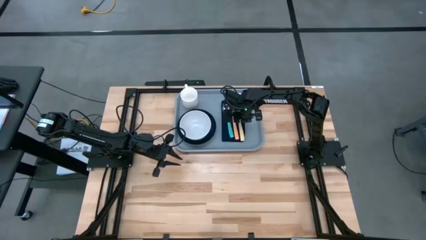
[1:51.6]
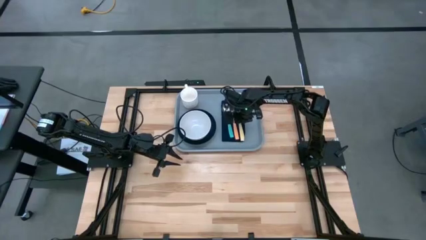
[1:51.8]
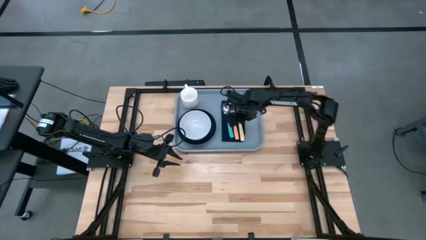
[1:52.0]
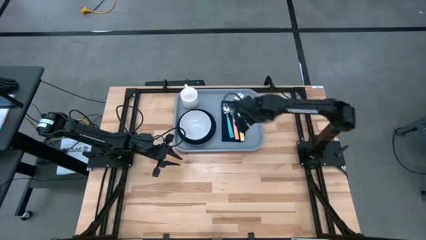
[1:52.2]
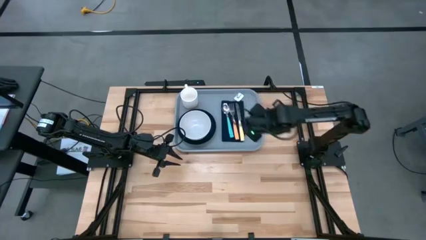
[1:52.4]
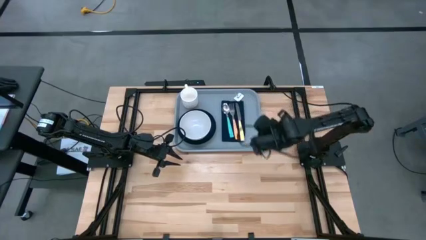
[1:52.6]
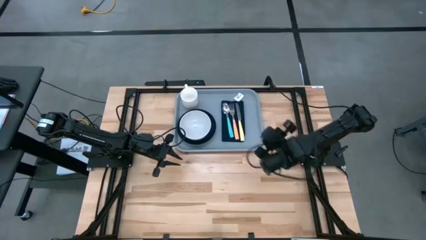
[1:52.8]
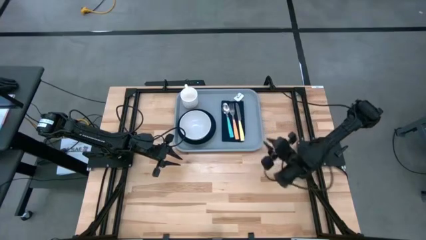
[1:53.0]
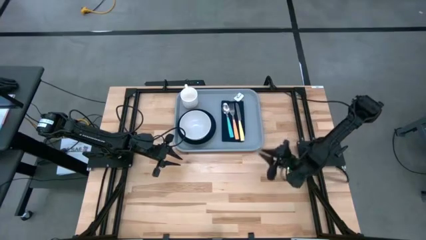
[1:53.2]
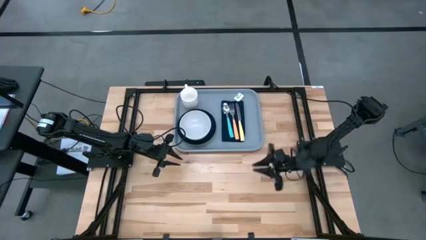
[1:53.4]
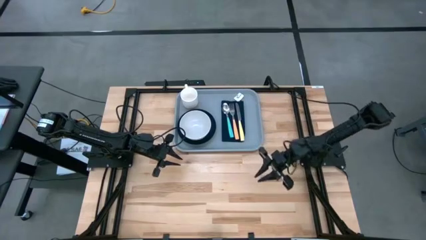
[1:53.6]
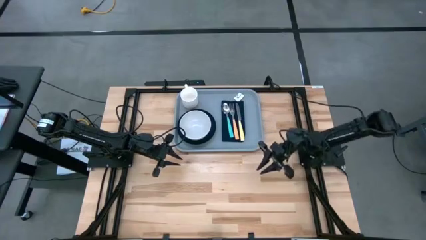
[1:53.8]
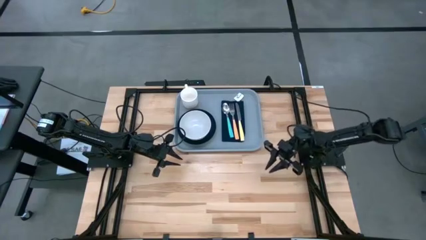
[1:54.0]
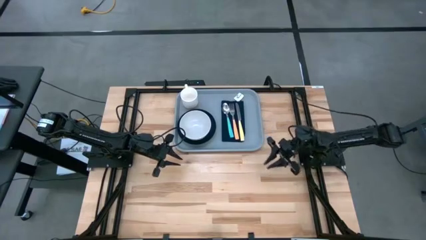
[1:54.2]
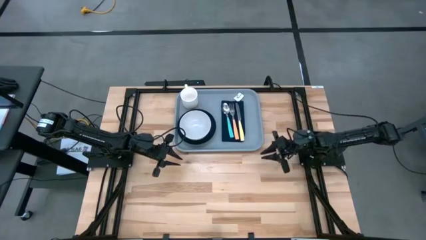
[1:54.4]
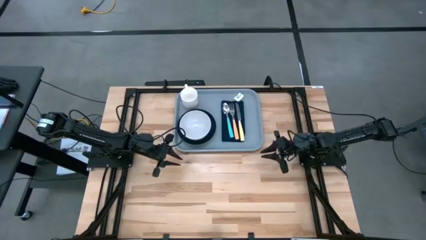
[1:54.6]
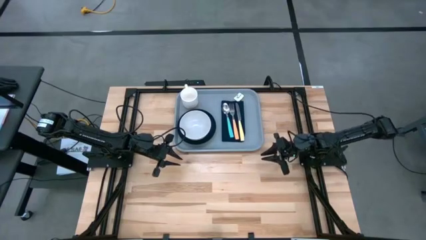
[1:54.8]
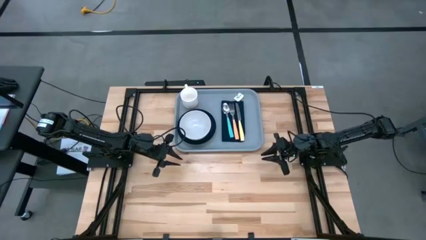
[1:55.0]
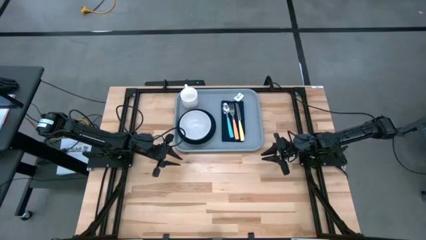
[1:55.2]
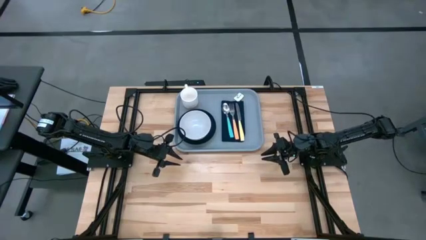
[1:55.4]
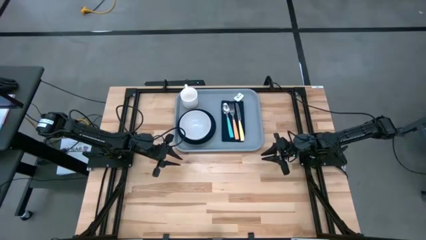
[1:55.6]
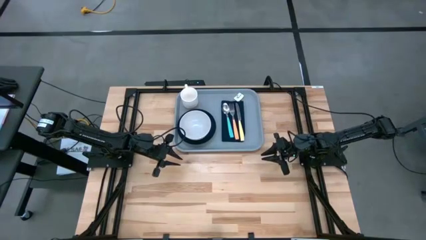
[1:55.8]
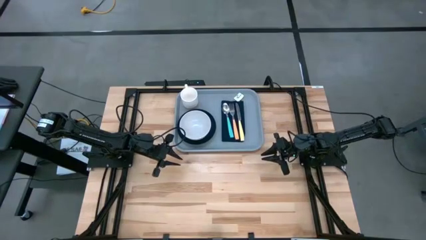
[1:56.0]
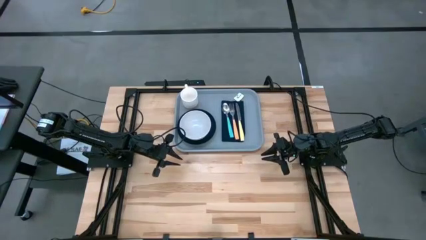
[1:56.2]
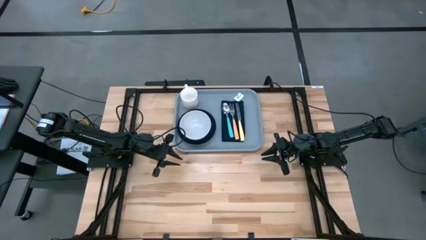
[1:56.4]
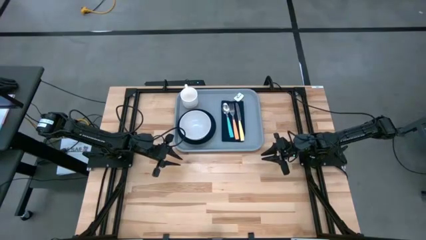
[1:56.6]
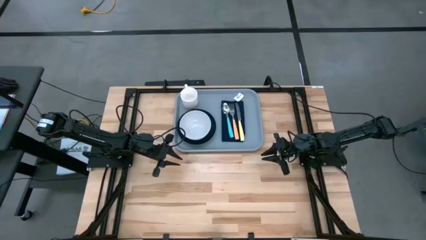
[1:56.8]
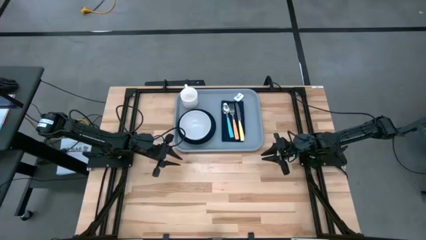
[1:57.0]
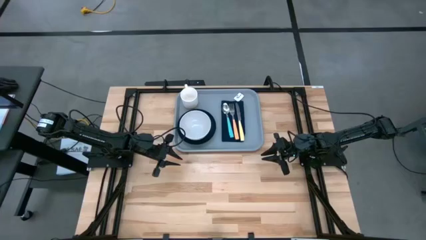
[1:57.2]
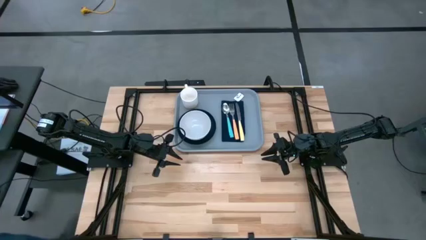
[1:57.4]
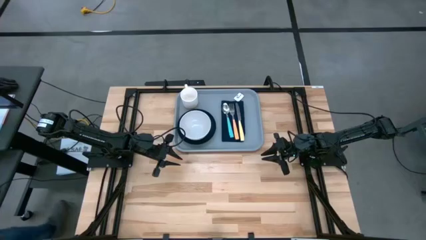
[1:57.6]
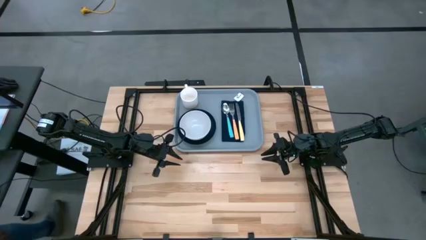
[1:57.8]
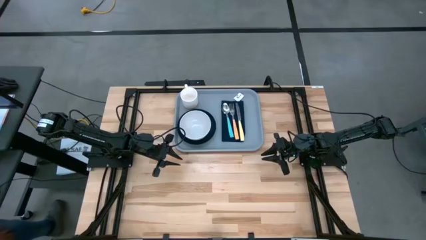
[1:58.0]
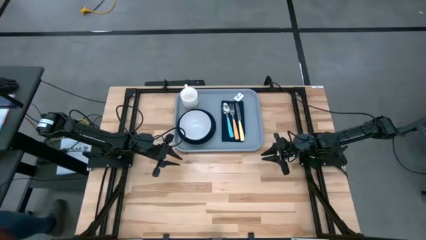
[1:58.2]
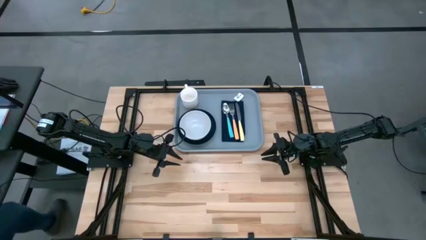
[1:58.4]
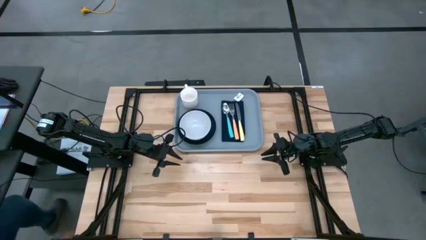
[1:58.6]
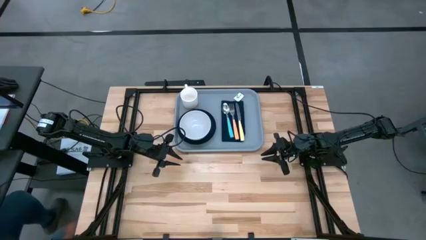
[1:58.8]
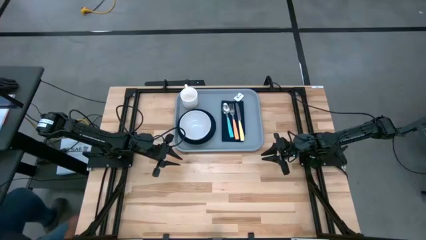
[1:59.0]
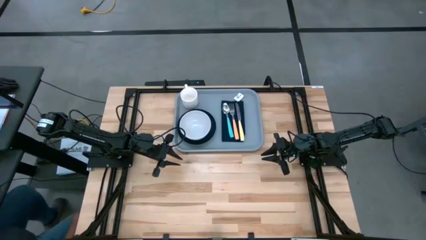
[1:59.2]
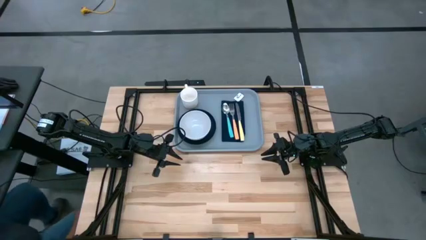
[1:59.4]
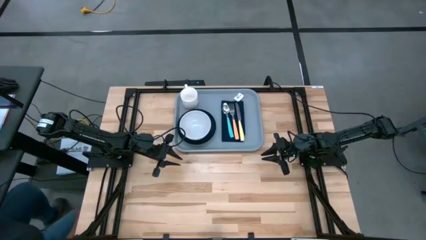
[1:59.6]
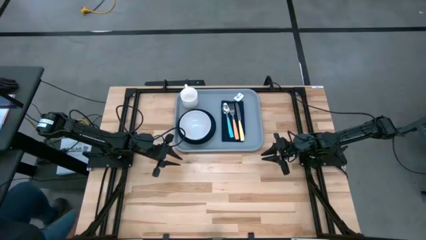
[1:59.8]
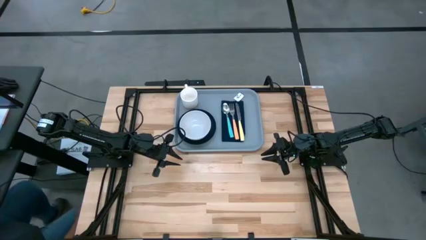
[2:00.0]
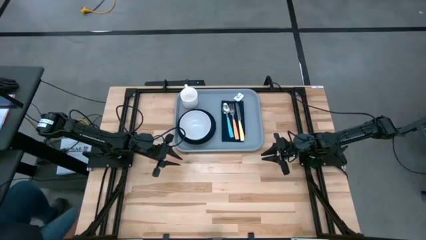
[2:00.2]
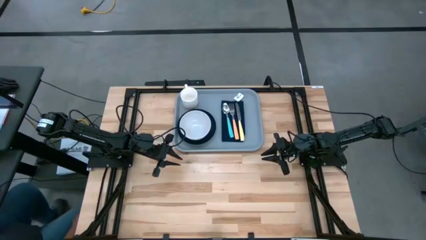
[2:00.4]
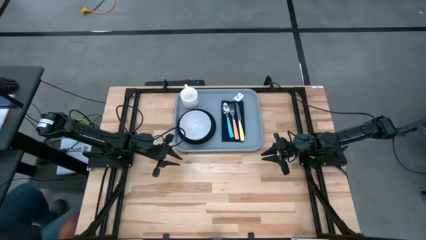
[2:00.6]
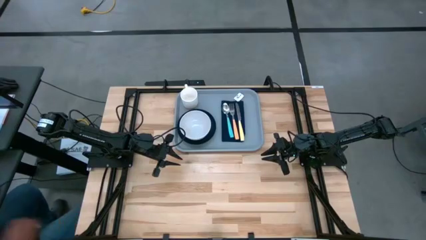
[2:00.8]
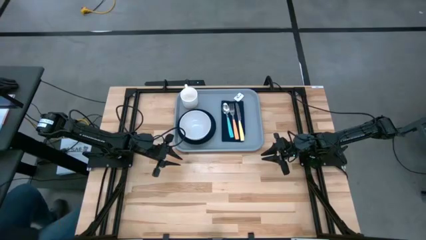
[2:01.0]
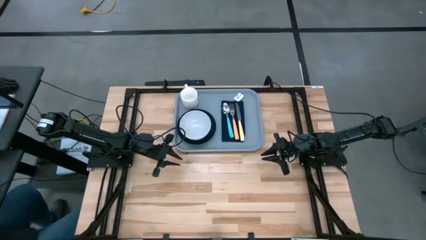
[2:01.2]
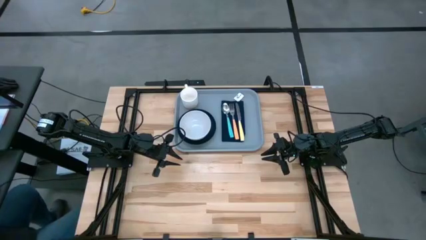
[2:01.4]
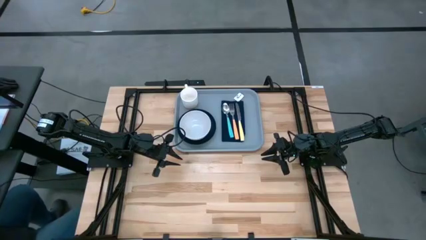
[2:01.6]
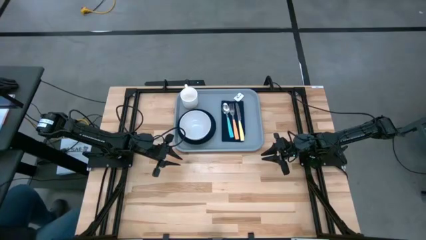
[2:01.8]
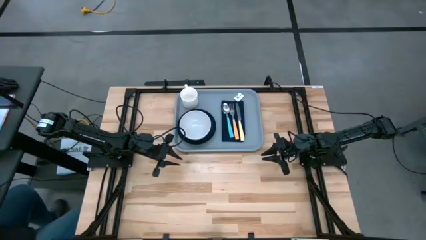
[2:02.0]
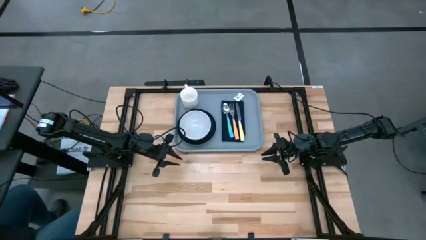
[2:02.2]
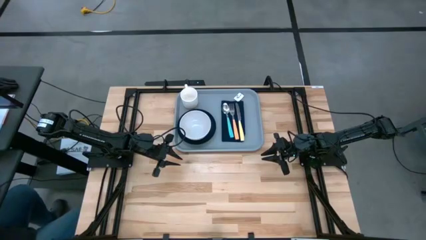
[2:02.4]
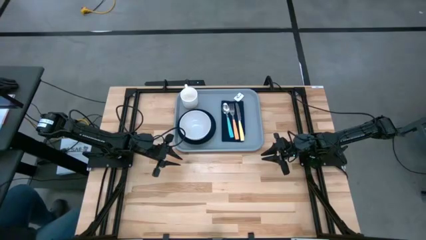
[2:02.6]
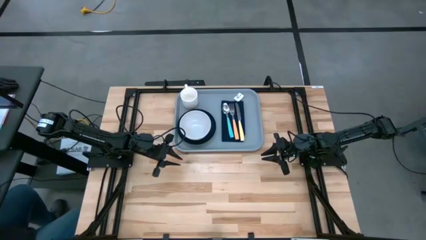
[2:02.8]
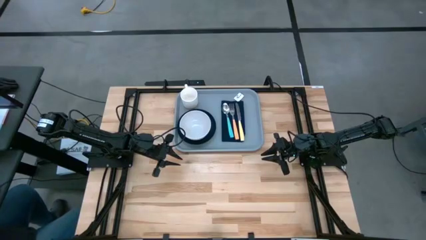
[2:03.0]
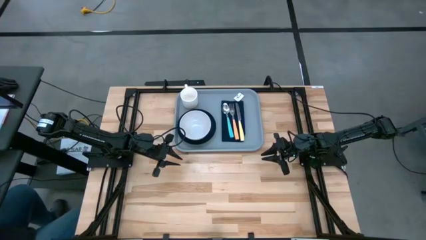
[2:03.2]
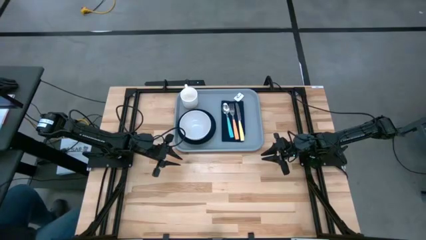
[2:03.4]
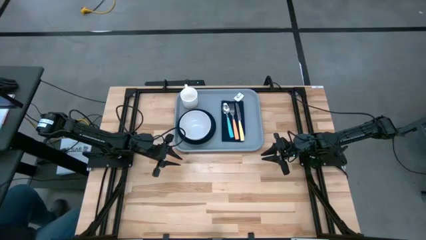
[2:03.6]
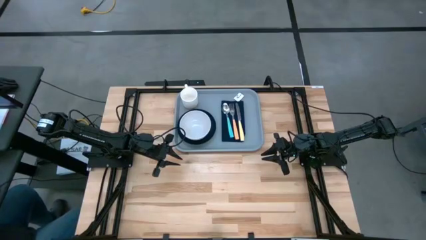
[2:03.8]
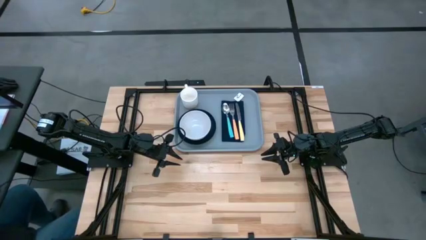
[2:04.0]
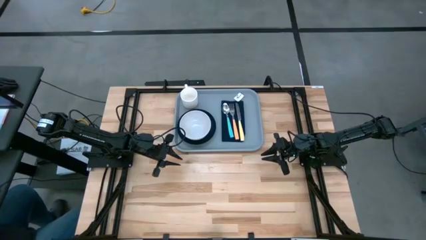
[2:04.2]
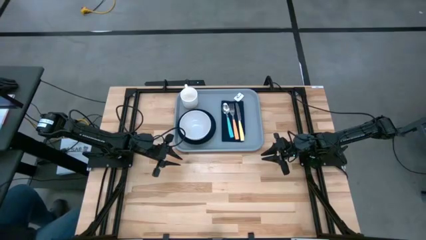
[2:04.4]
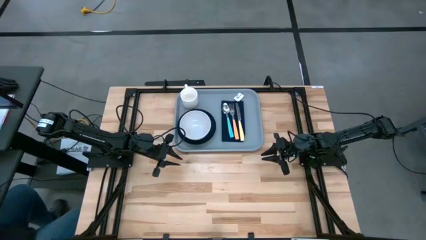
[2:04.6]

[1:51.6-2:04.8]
Task: Set up tray
Return to Home Position

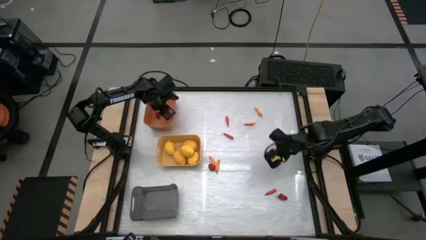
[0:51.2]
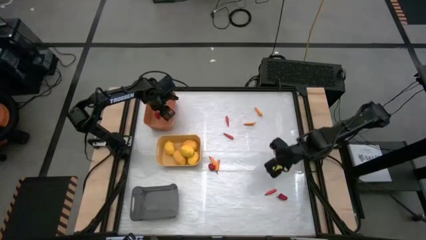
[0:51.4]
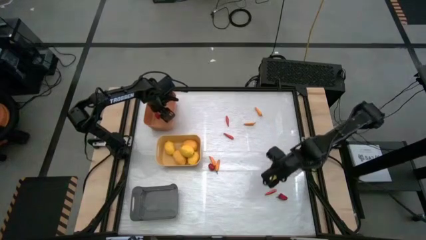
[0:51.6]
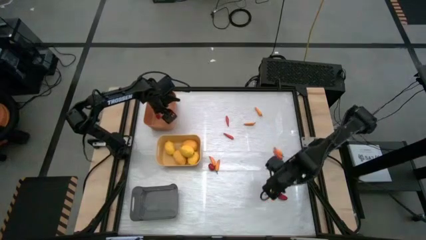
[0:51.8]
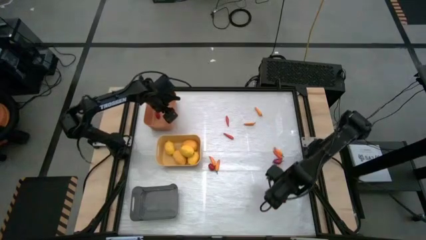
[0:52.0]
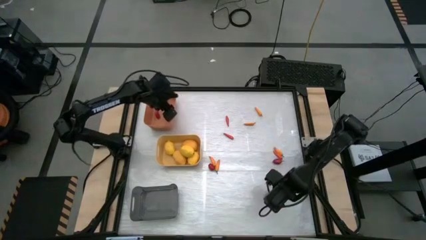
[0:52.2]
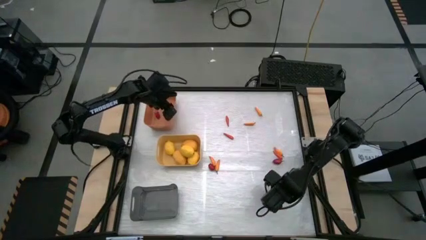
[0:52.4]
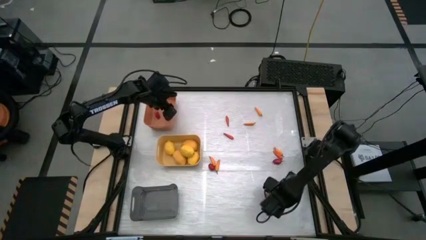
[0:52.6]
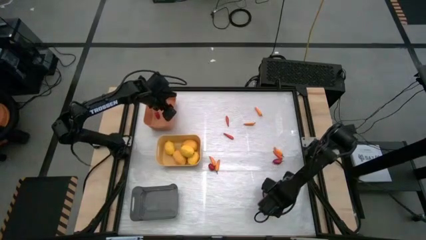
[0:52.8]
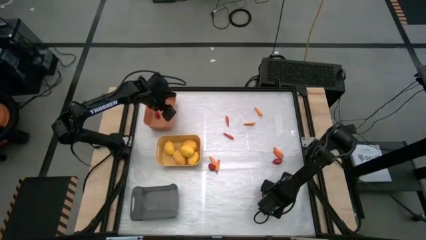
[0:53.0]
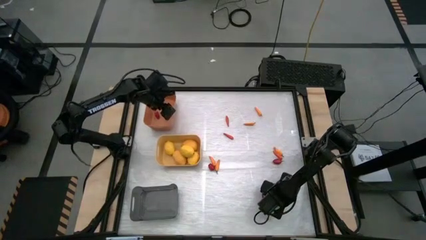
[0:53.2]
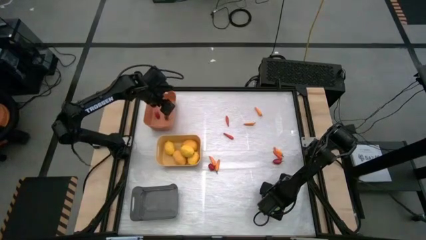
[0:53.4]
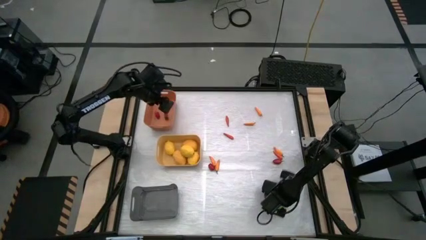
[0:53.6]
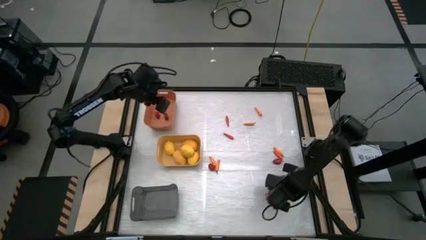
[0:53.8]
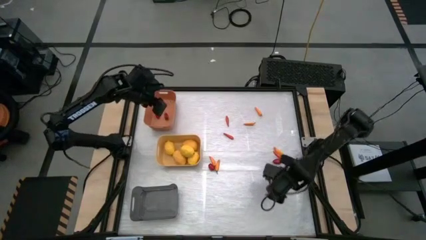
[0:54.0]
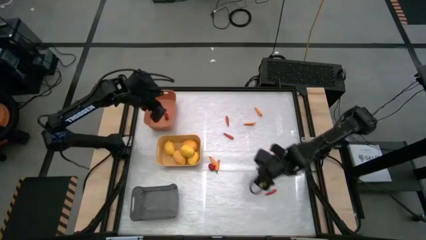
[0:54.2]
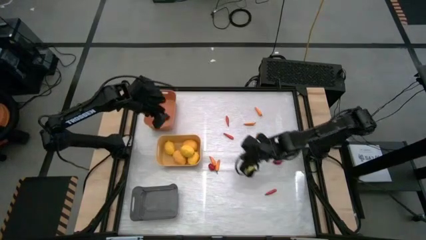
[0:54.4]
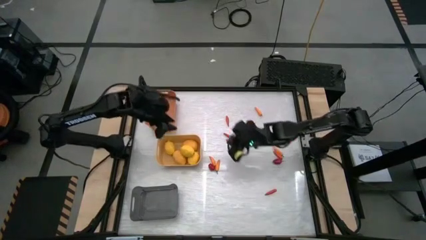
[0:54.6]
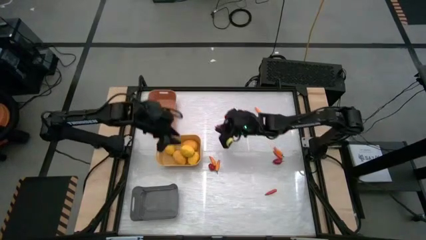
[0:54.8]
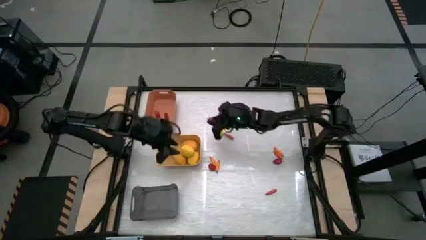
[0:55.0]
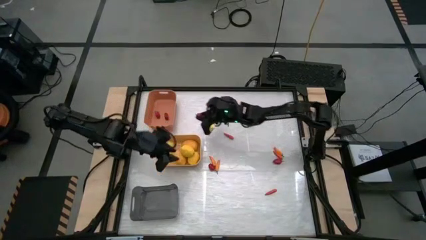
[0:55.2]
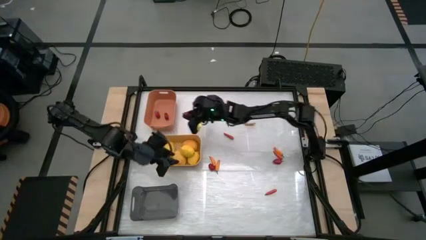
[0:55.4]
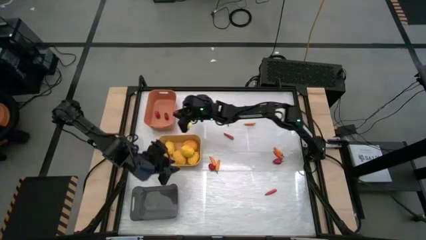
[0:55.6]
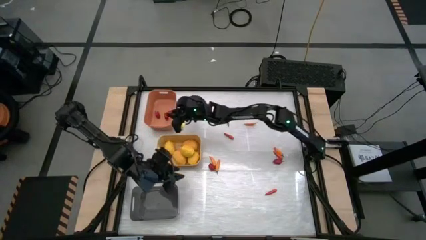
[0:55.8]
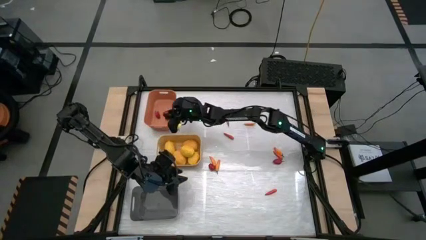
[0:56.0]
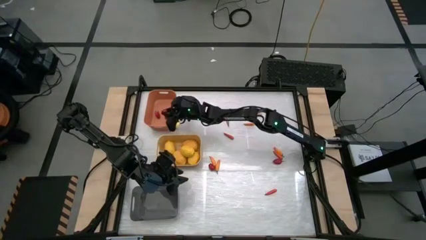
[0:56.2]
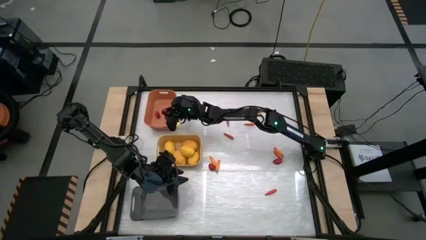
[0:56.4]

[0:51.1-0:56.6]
Task: Sort produce into baskets
Put the red chili pepper into the orange bin
